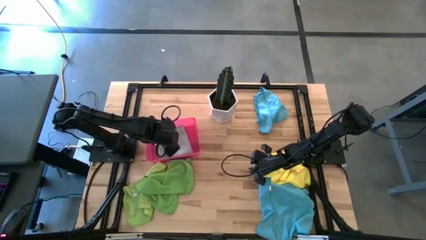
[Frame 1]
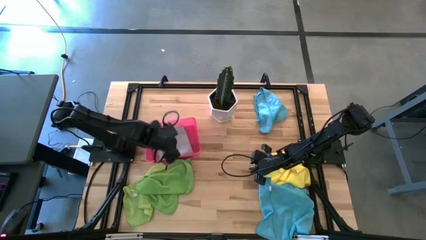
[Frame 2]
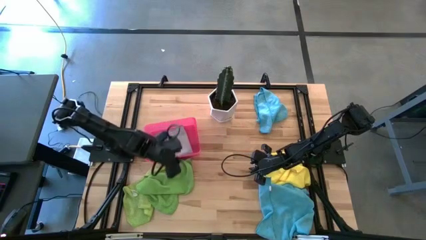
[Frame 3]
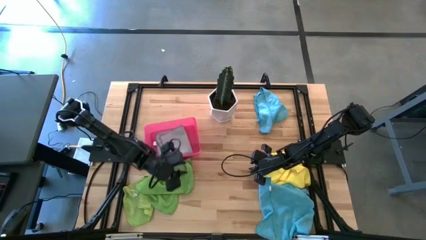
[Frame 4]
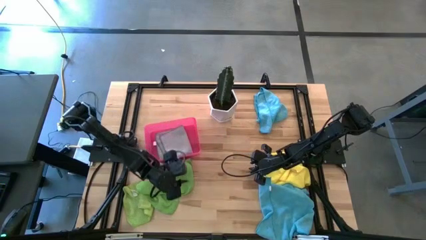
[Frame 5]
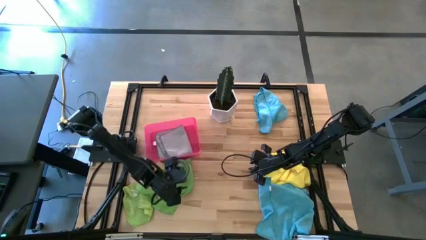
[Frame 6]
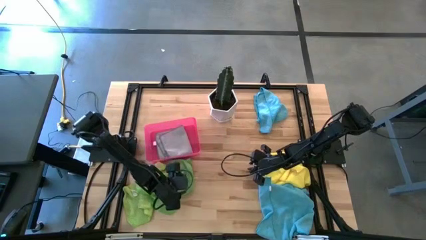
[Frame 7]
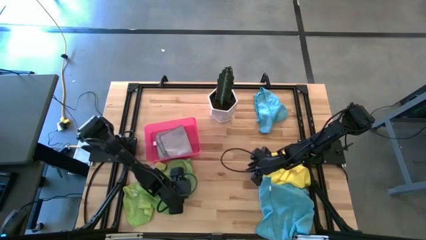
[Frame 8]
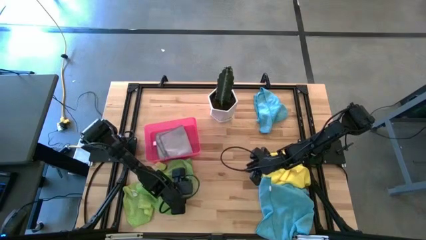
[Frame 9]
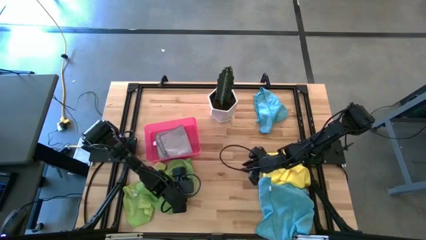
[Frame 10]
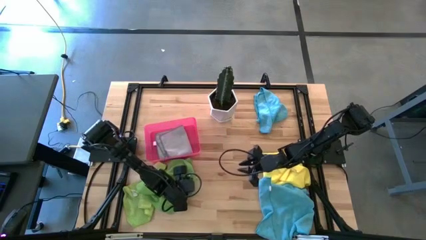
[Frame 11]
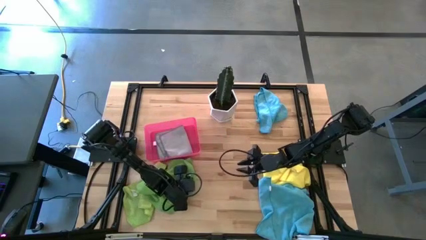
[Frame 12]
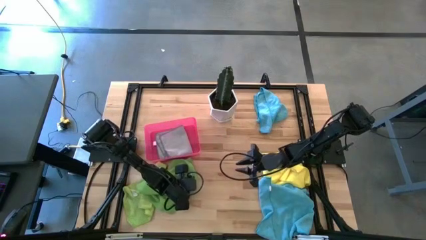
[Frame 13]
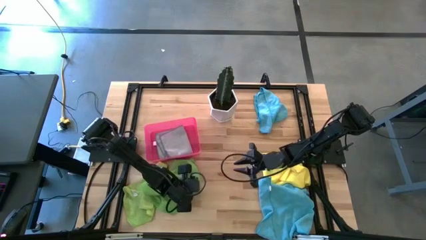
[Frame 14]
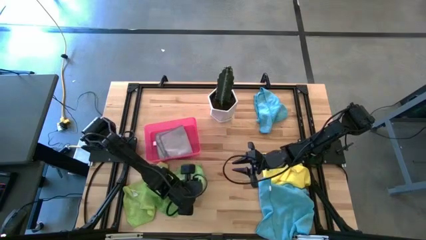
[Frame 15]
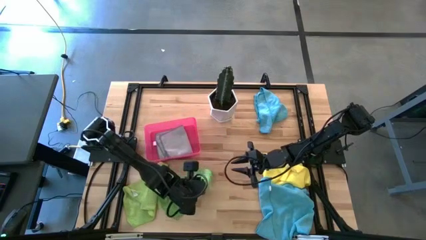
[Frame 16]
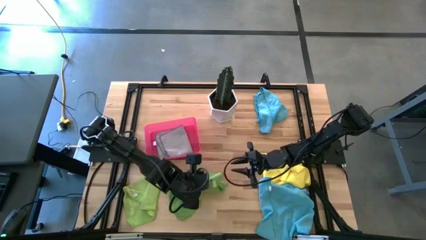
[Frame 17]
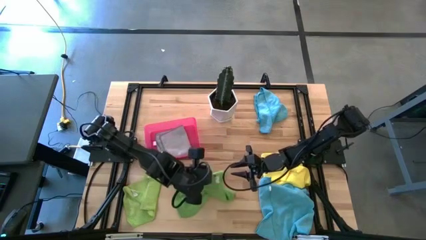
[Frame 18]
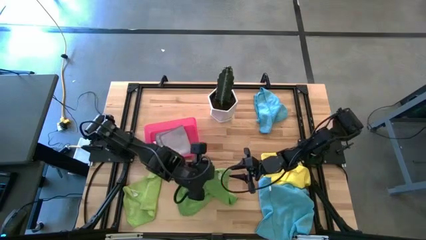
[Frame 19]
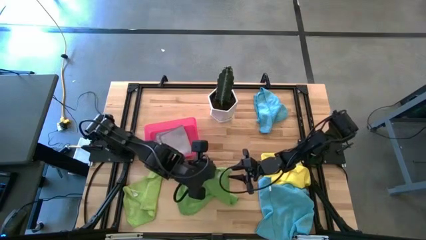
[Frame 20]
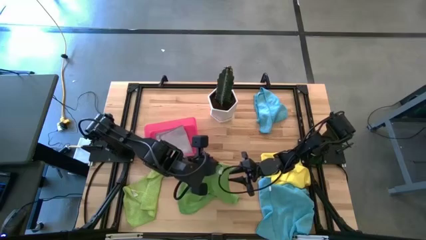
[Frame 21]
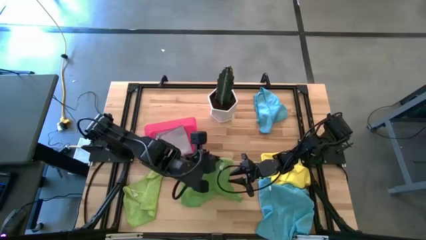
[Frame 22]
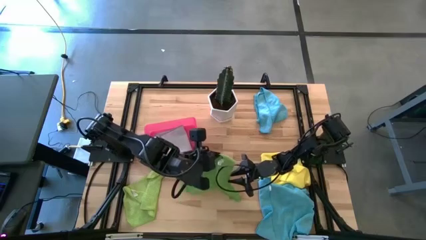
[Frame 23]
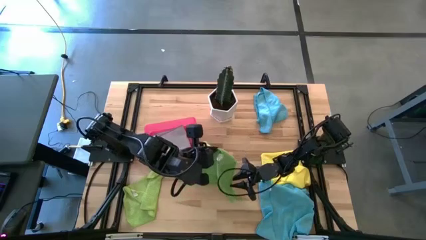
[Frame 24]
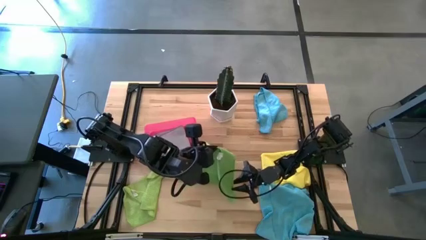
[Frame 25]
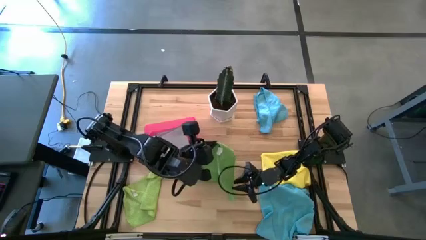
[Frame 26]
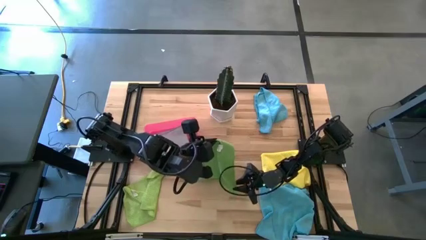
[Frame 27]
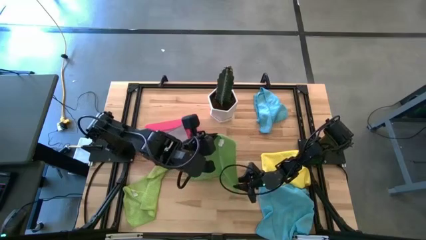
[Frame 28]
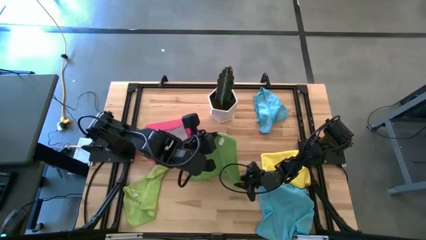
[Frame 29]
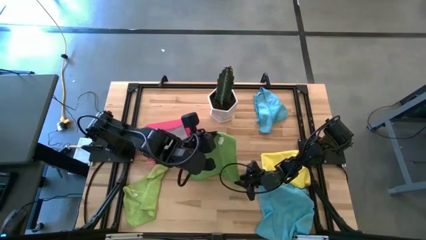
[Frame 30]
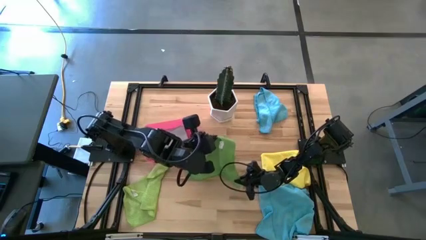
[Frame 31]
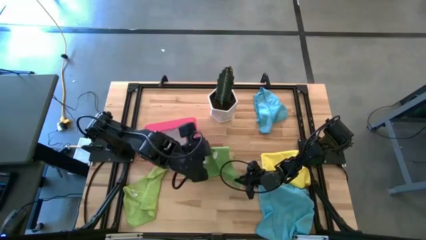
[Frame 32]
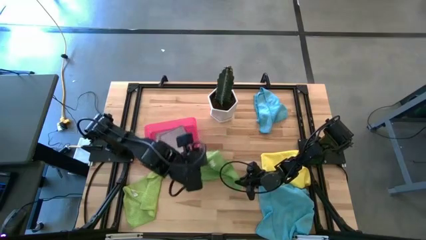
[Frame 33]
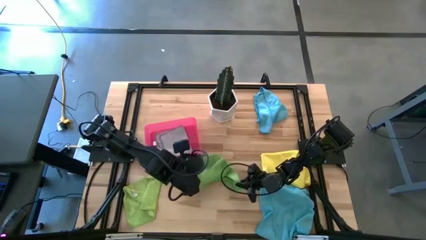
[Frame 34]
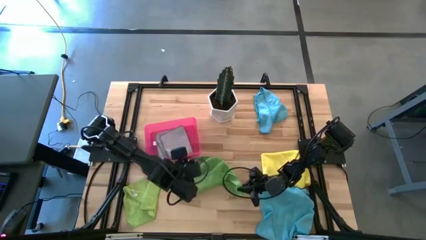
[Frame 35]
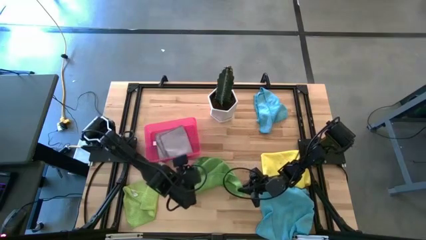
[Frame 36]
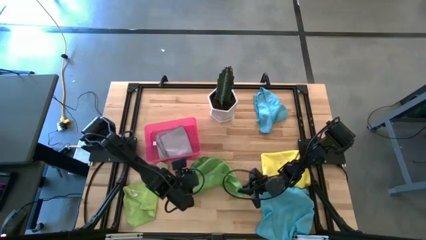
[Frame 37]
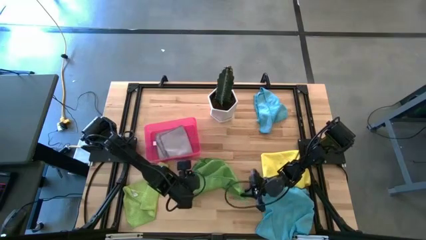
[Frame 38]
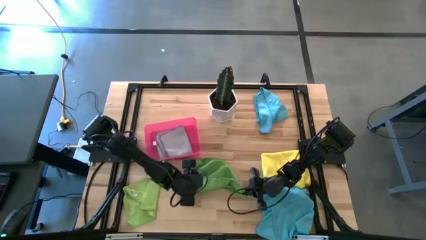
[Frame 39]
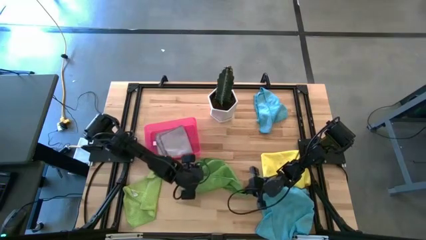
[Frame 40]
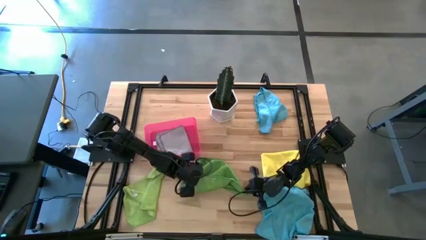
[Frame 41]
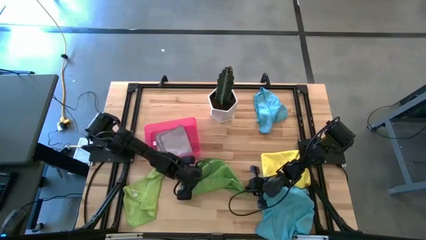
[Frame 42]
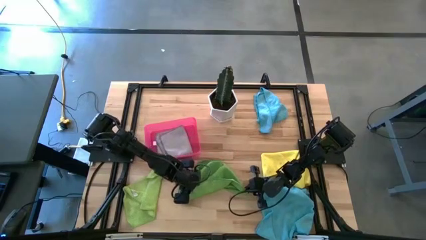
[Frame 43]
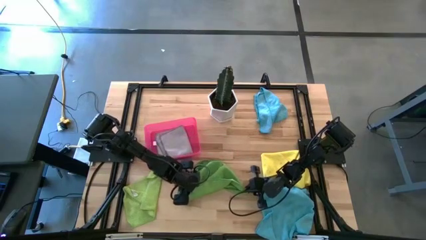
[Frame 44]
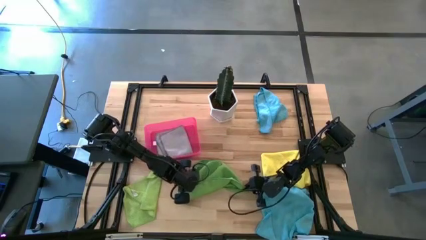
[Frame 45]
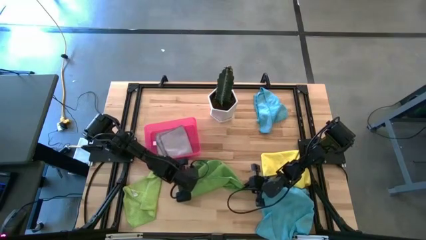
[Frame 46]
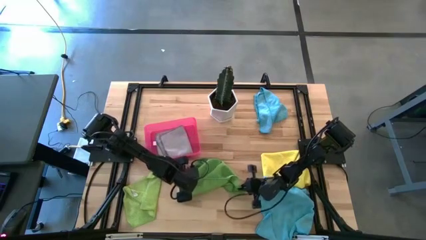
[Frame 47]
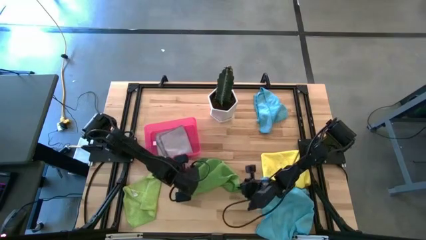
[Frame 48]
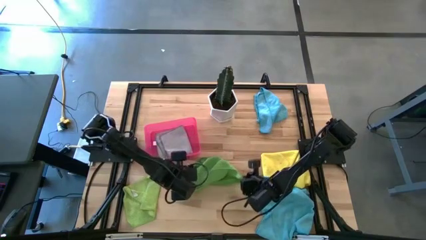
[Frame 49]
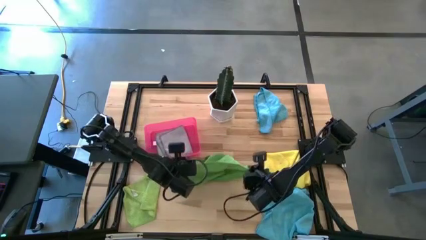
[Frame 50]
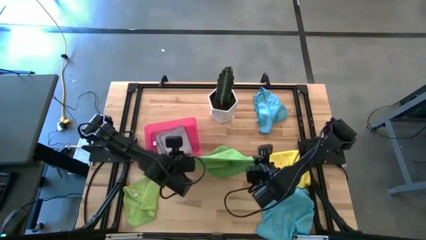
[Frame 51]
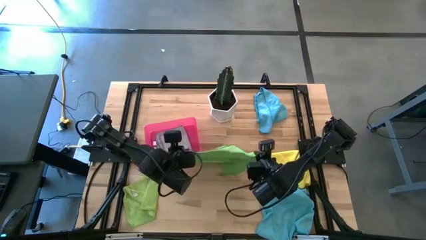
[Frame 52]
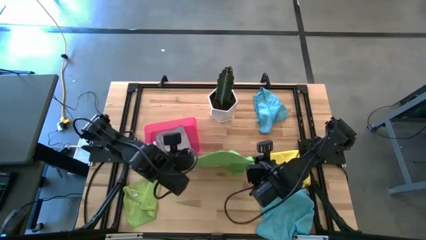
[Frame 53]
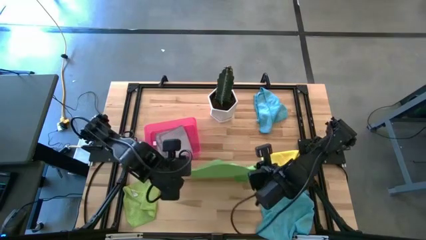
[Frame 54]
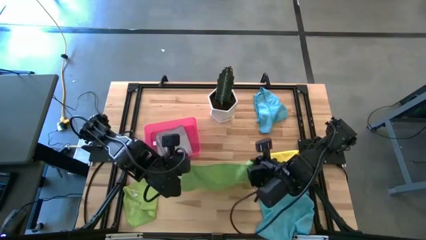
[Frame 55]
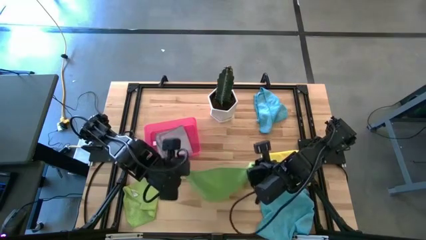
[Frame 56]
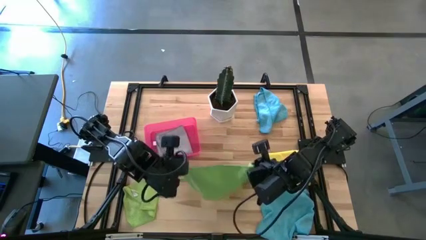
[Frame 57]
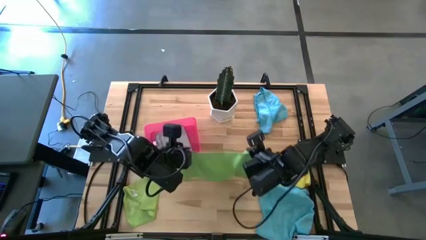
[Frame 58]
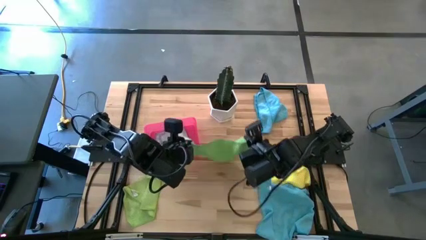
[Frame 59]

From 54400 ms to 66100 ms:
Task: Fold microfiber towels
Fold the green microfiber cloth

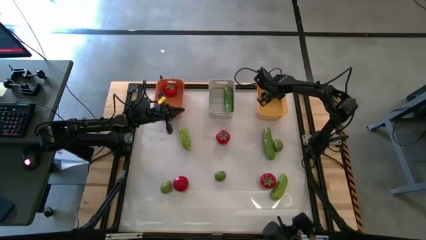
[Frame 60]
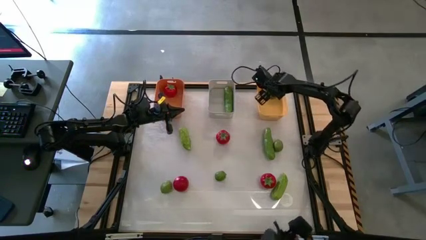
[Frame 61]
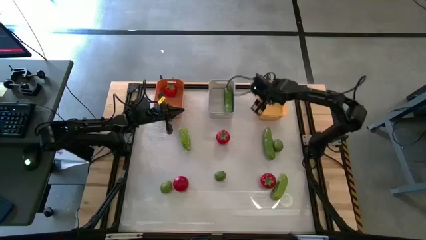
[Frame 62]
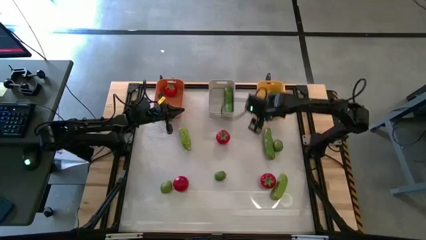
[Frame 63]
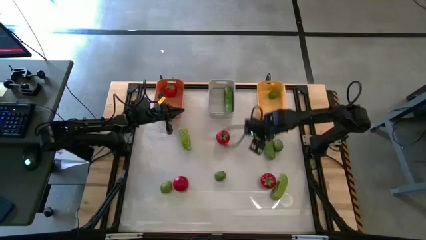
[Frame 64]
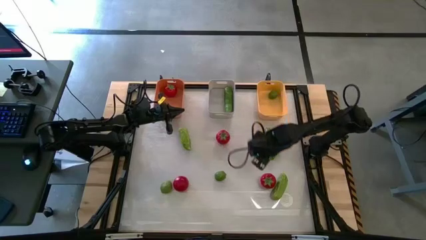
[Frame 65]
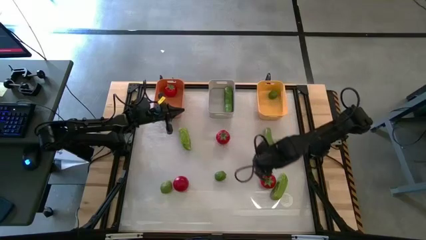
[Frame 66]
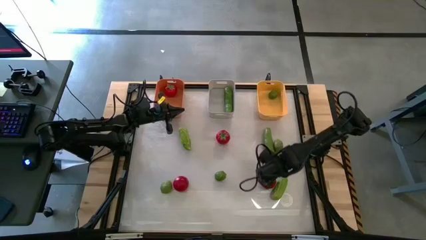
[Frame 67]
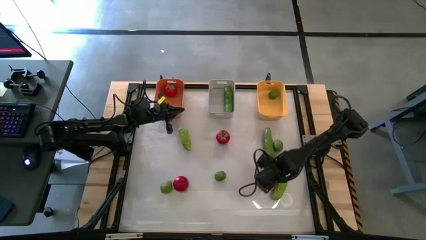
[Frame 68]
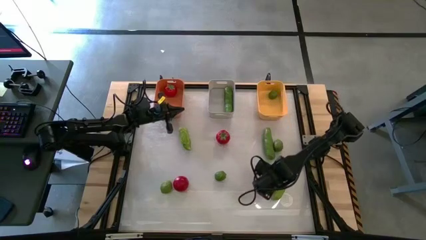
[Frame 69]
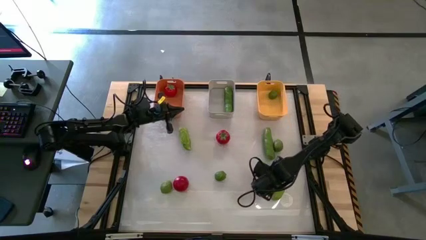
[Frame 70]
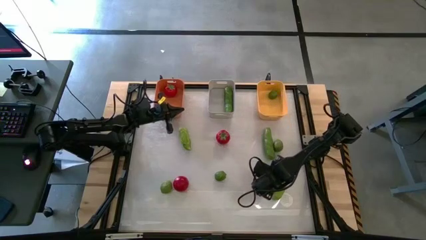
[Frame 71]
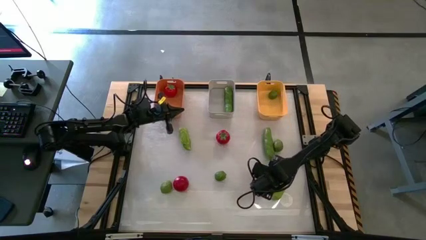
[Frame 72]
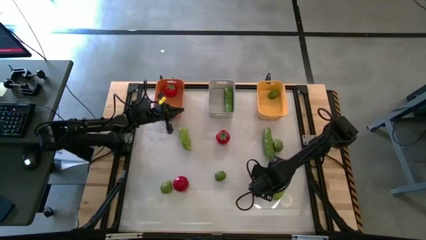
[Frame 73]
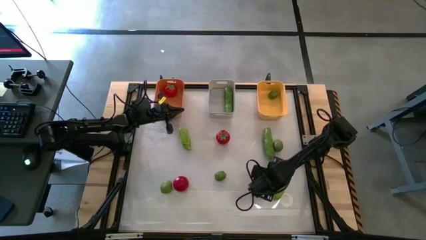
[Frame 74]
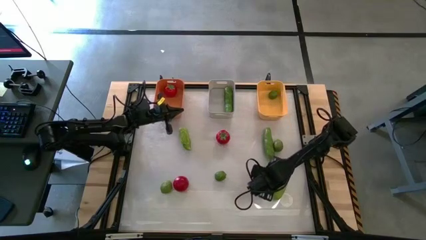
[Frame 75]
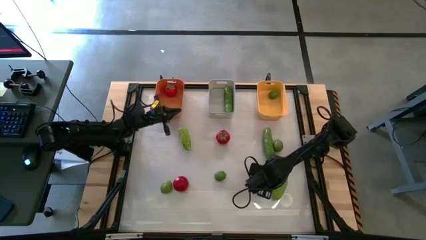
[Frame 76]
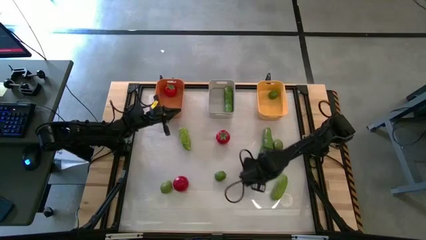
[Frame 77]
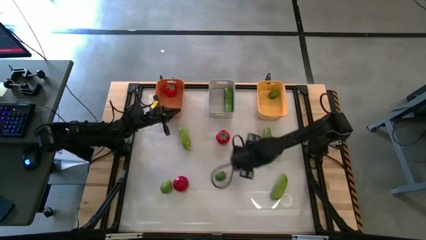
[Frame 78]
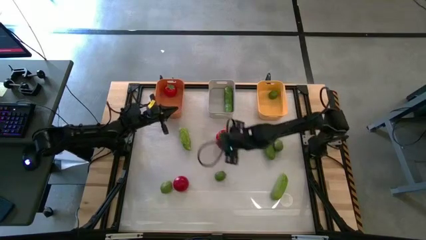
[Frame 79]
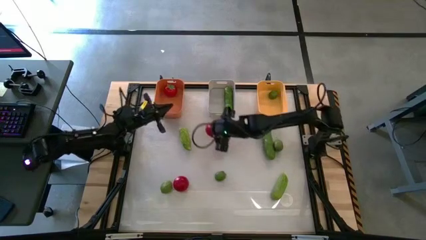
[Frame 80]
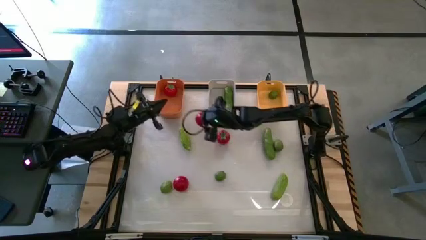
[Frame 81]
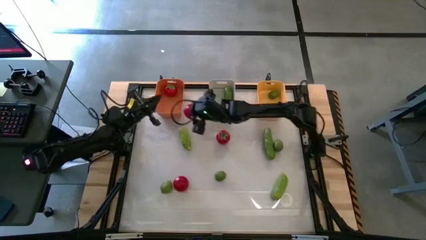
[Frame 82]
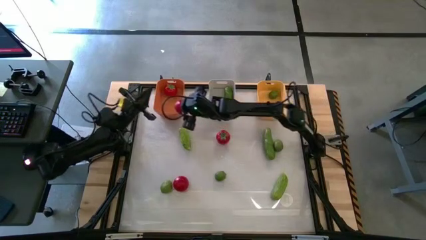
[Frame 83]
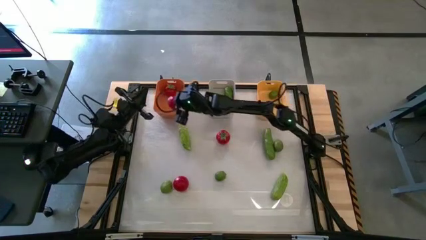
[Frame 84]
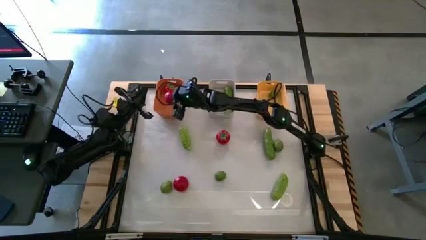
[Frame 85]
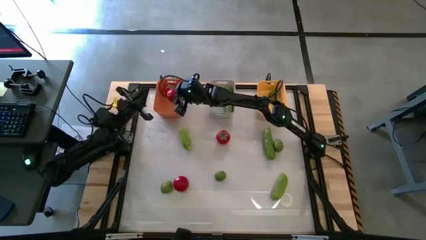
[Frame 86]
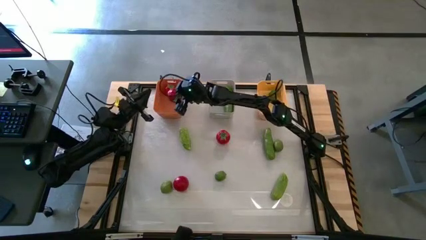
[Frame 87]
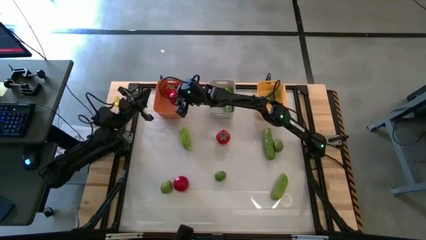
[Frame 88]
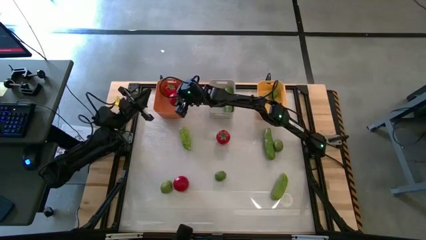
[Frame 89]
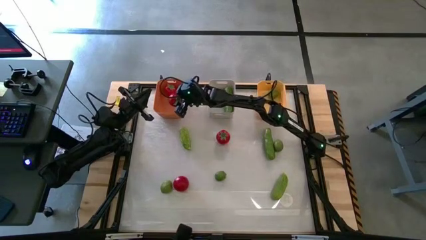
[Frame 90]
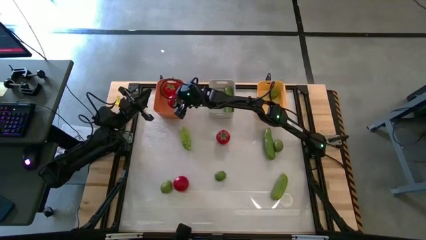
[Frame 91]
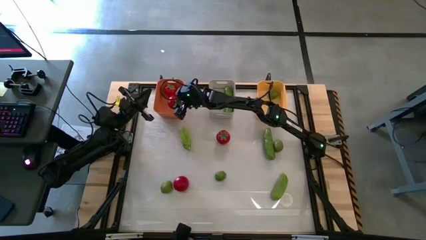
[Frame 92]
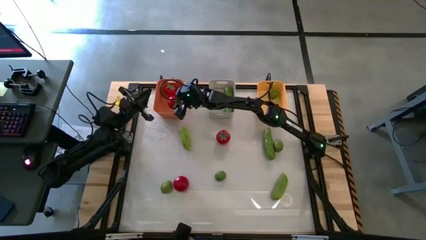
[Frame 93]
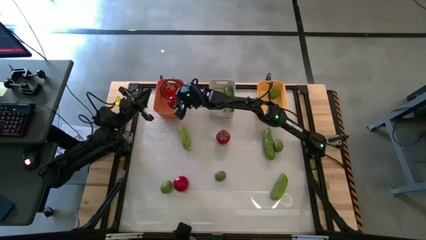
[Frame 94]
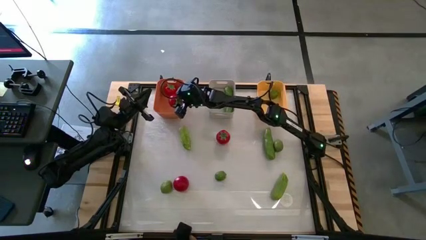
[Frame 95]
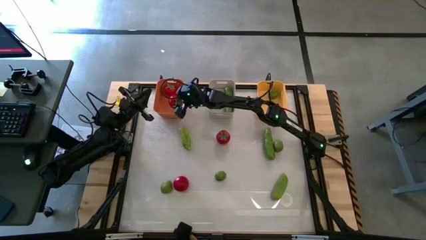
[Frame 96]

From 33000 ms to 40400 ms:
Task: Sort produce into baskets
Put the bottom right tomato into the orange bin
